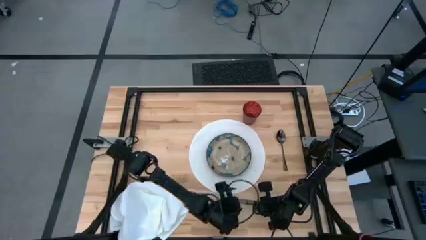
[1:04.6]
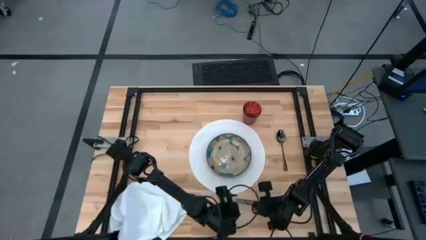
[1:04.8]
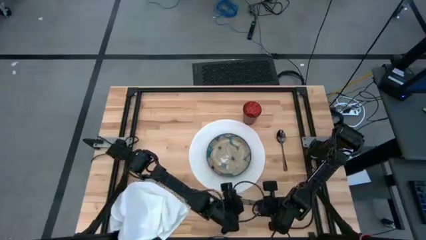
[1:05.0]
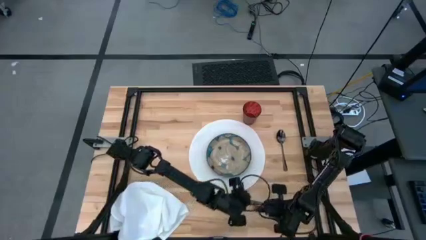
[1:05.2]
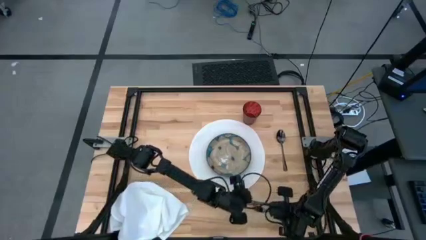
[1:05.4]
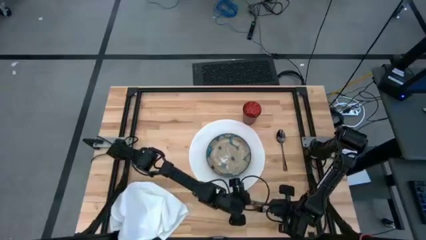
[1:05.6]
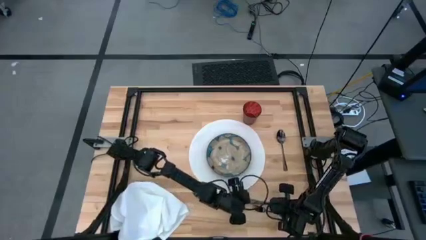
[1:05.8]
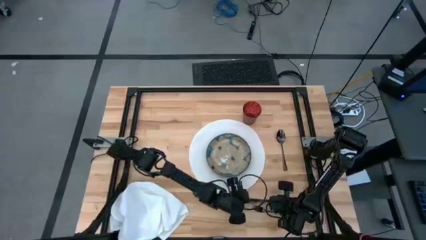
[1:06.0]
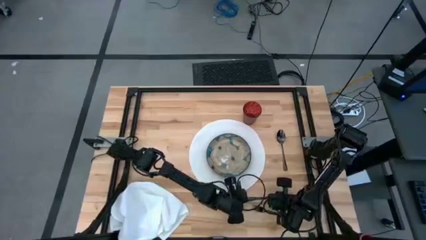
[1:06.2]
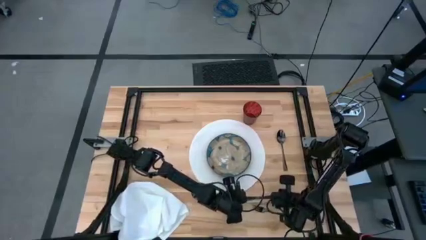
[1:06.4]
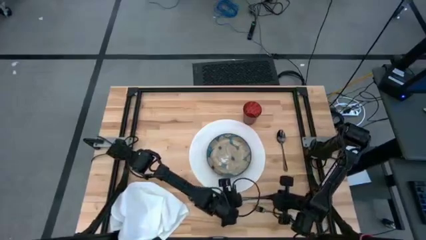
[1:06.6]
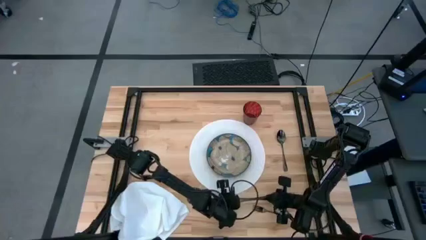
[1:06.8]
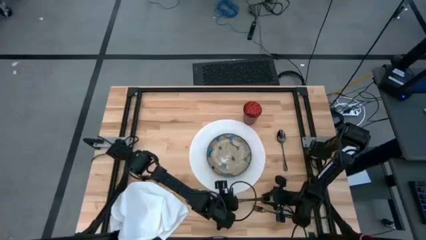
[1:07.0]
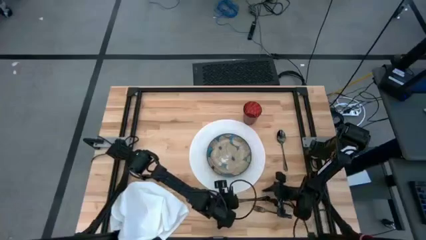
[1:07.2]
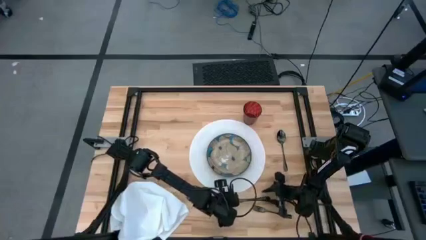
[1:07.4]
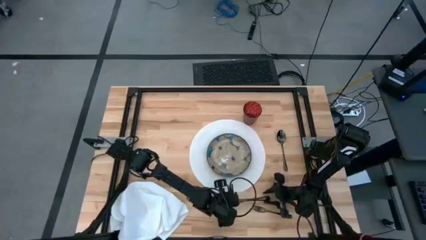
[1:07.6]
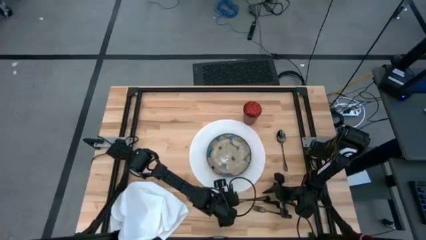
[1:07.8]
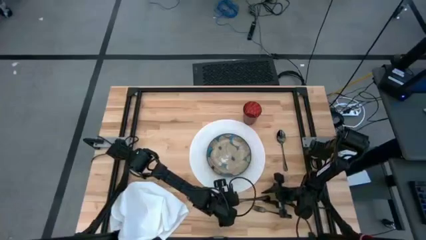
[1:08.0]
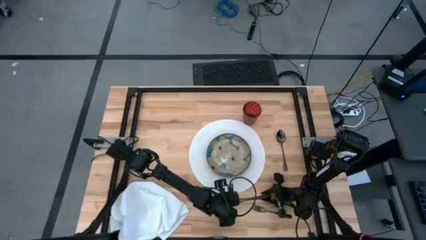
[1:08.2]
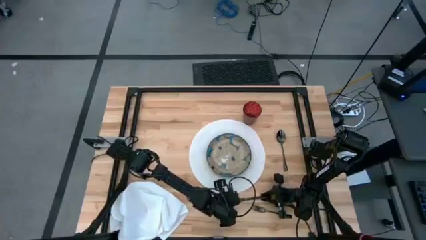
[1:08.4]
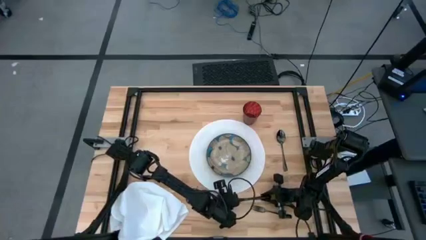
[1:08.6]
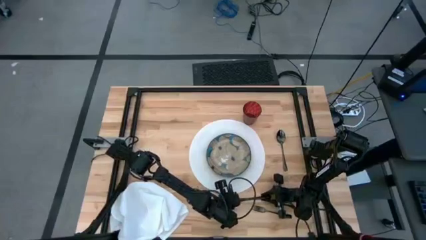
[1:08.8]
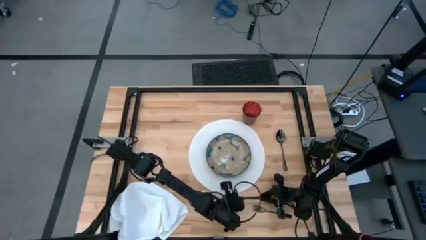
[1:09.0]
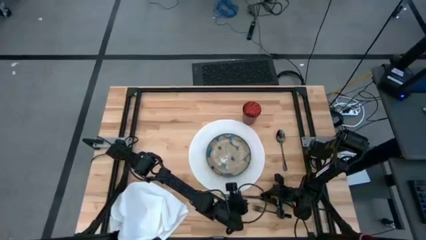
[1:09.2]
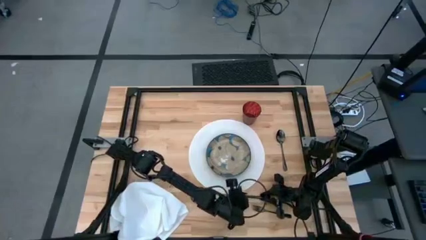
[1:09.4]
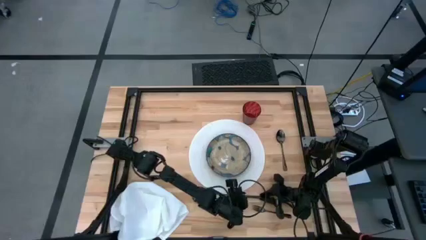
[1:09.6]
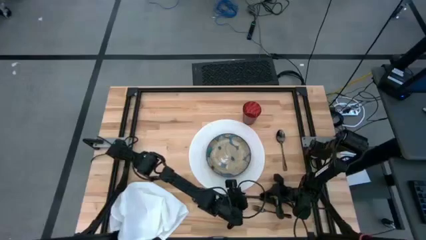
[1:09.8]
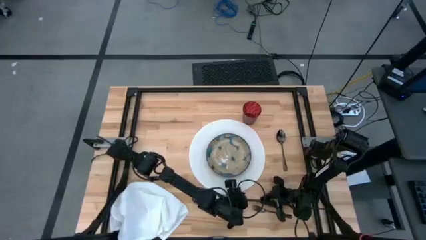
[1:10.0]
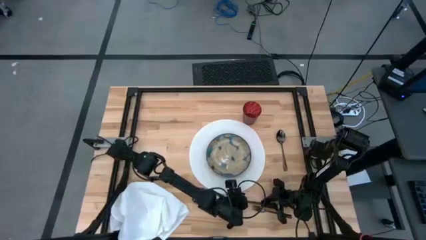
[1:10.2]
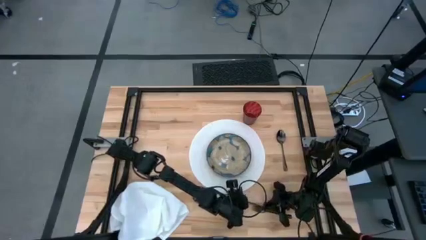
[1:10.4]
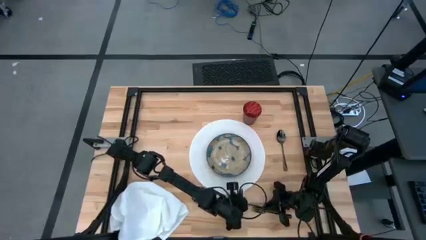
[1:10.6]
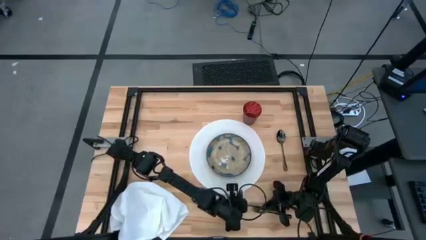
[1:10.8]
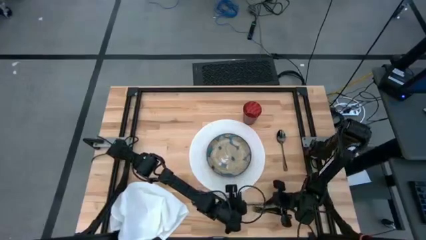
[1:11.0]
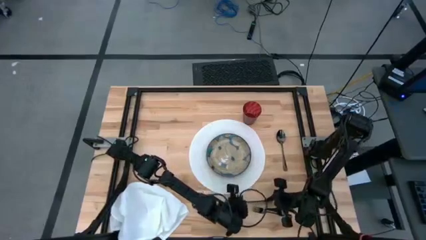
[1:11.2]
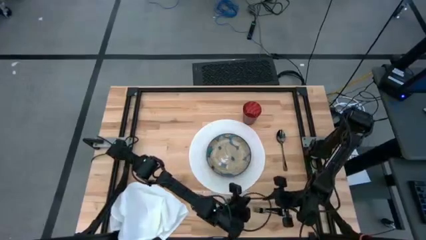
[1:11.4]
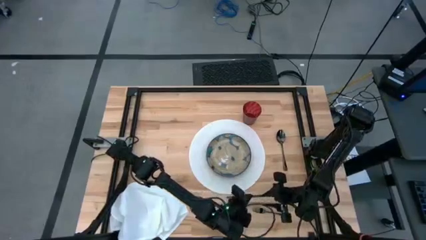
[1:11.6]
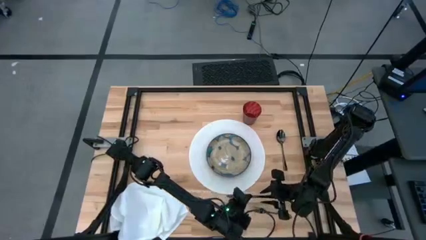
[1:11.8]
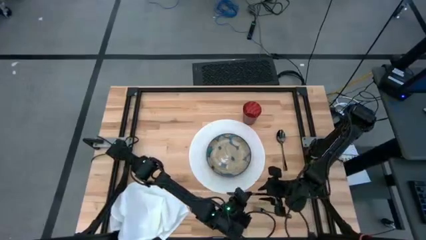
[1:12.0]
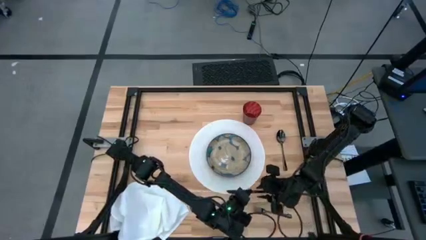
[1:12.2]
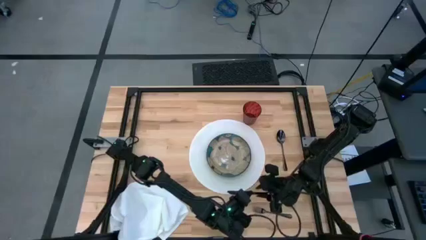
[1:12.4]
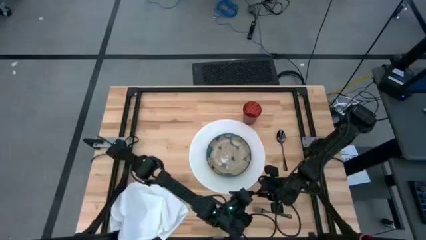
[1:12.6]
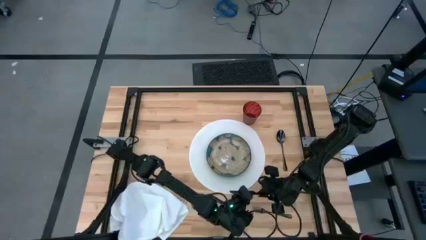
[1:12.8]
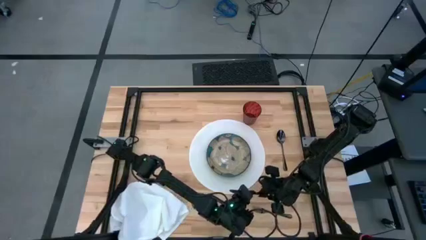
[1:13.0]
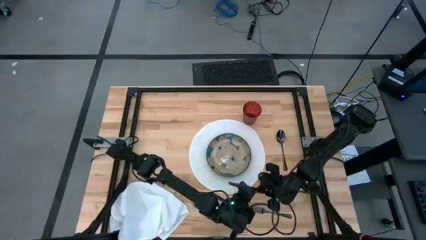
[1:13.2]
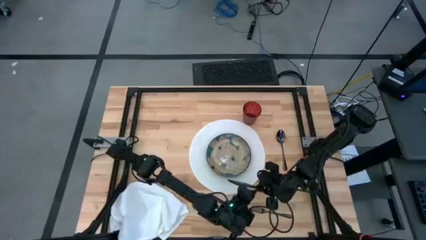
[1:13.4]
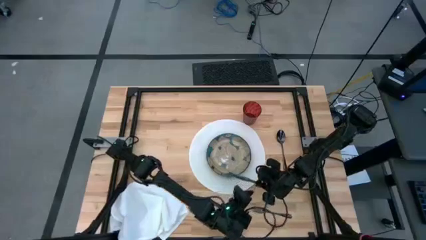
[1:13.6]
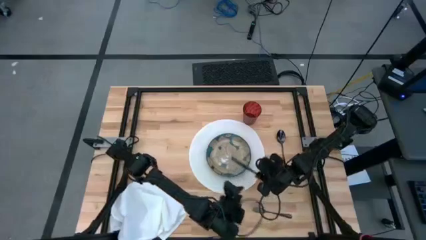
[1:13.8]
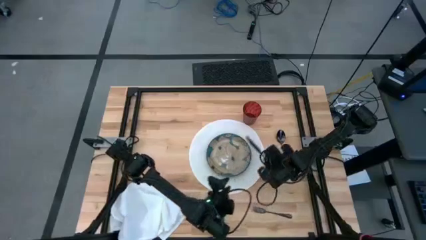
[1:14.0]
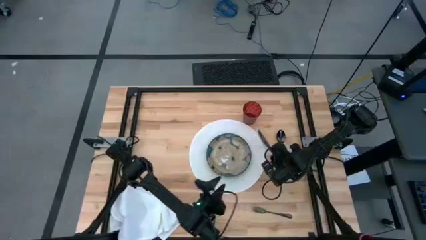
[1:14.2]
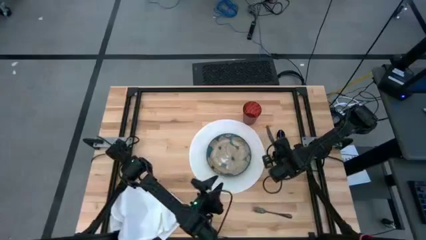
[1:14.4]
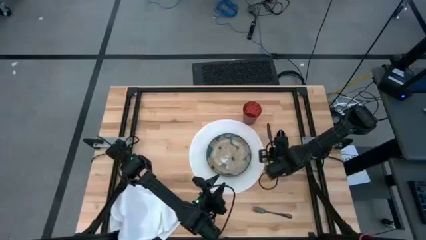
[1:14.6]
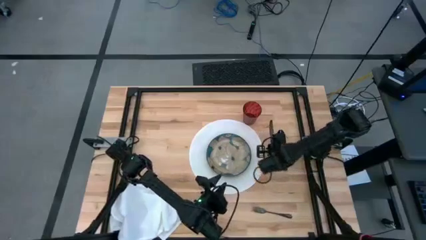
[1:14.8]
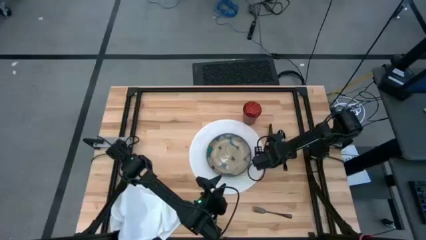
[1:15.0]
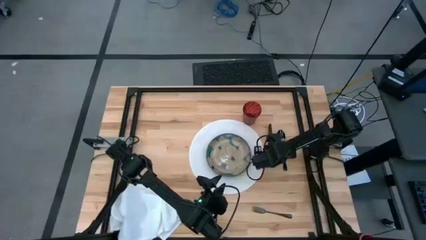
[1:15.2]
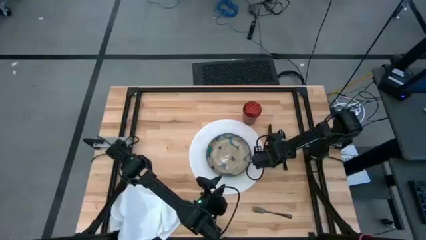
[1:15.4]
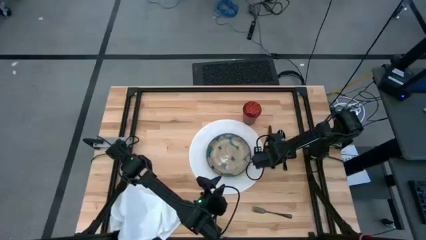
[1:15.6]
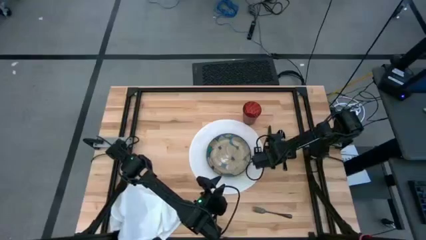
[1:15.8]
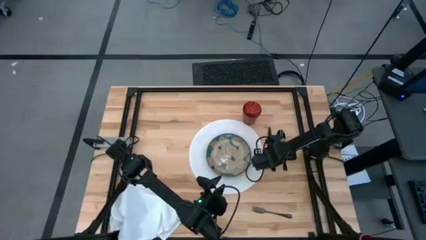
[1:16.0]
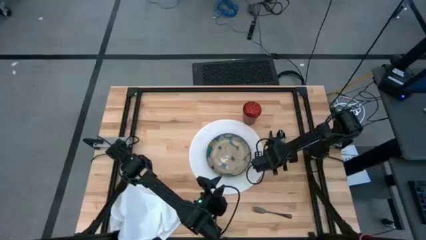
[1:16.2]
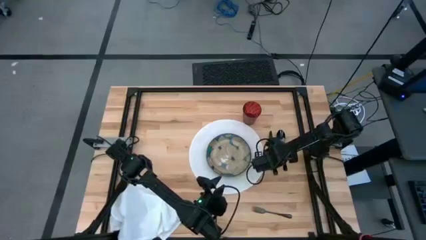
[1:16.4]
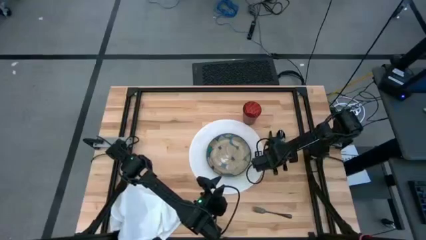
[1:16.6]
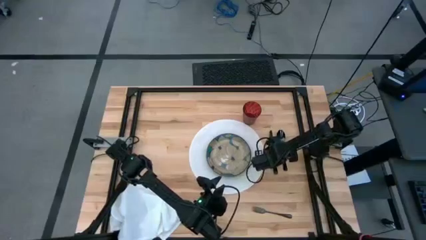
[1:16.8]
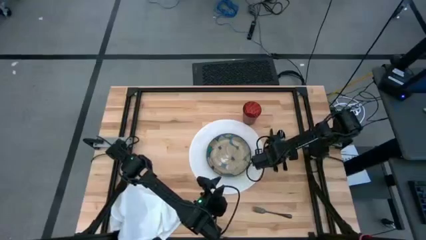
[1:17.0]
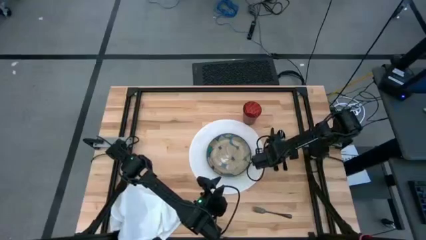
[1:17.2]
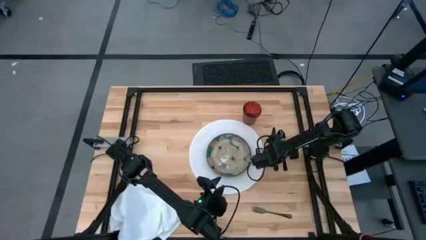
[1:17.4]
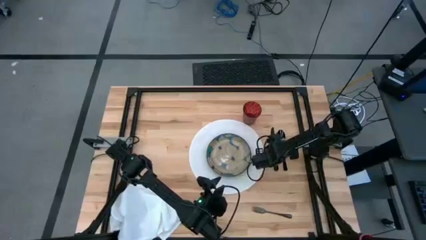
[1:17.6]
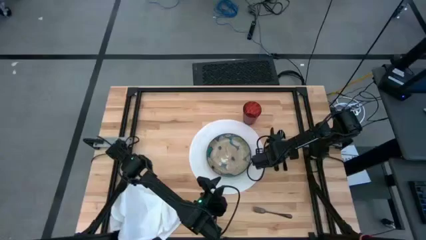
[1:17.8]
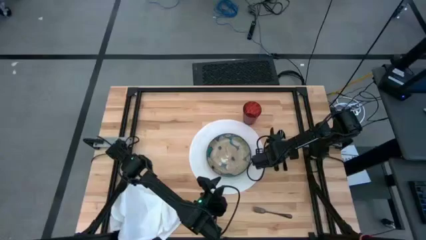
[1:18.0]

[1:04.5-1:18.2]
Task: Set table place
Move the knife to the middle right of the table

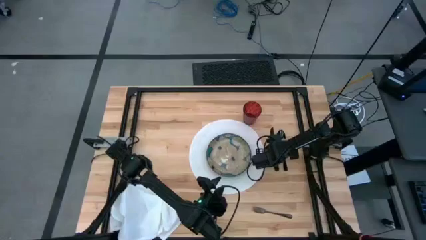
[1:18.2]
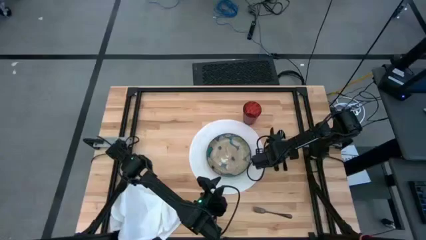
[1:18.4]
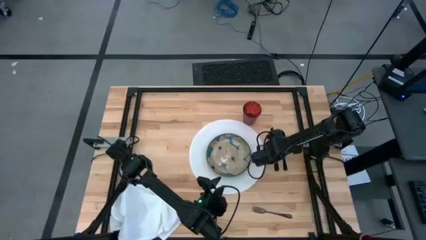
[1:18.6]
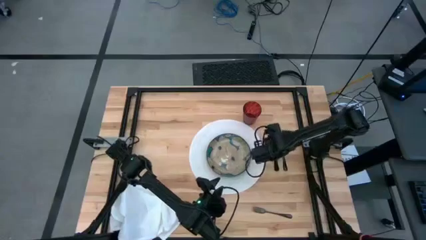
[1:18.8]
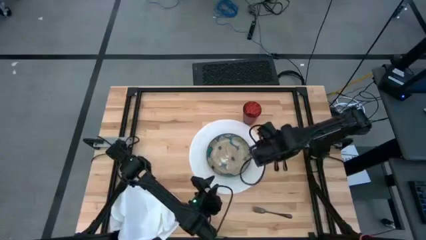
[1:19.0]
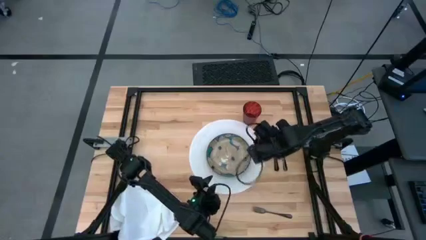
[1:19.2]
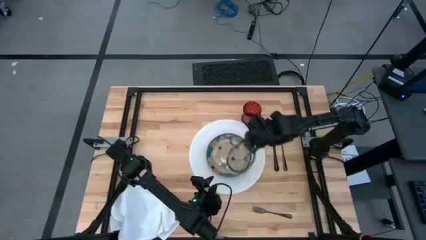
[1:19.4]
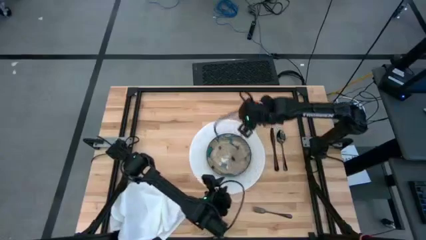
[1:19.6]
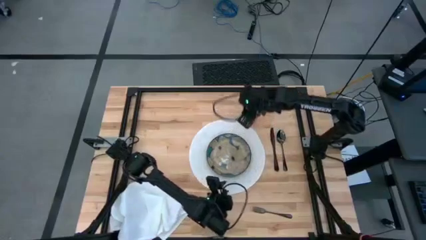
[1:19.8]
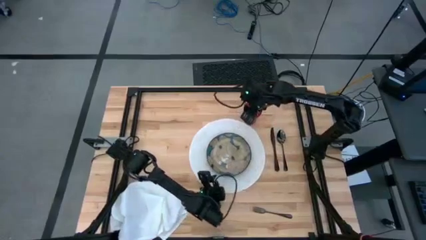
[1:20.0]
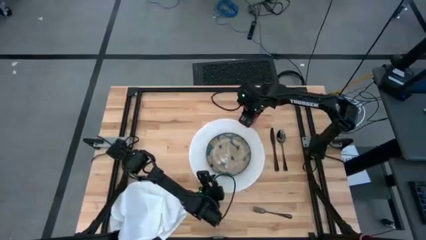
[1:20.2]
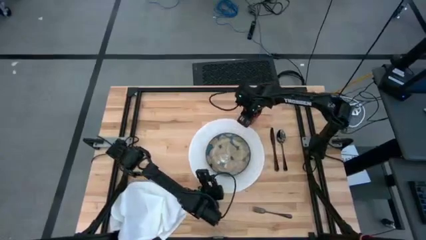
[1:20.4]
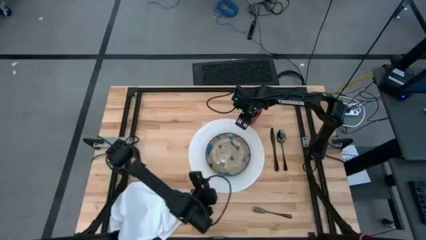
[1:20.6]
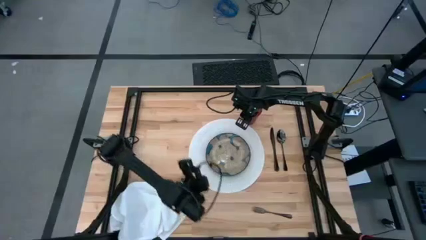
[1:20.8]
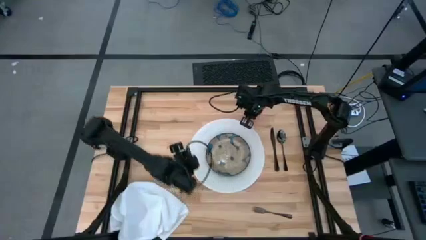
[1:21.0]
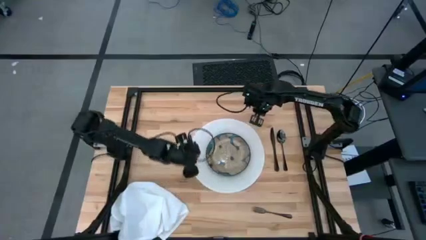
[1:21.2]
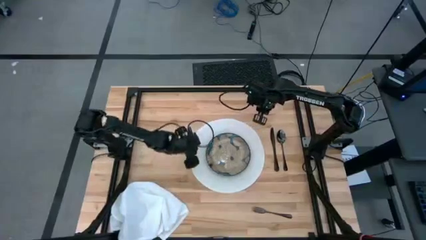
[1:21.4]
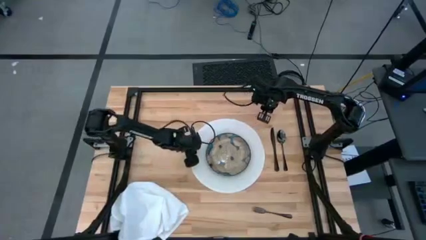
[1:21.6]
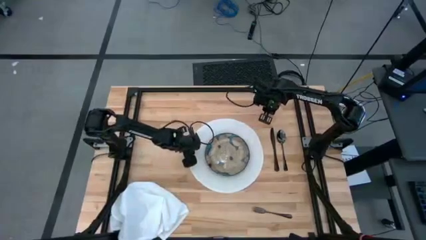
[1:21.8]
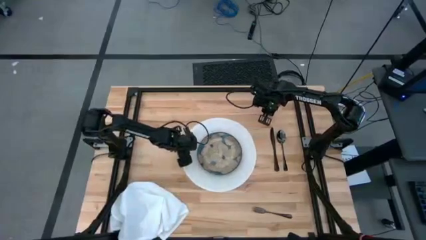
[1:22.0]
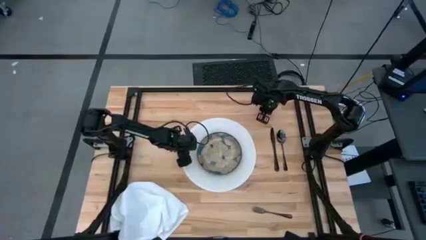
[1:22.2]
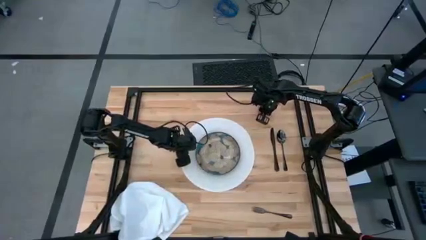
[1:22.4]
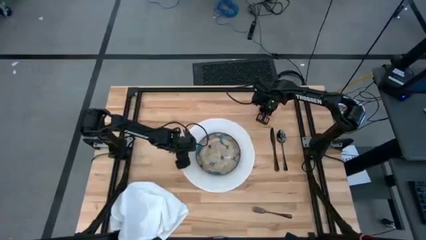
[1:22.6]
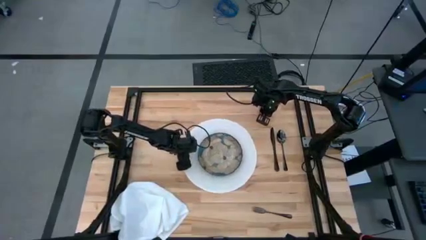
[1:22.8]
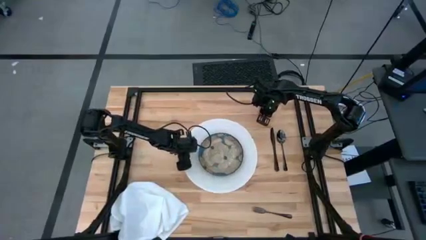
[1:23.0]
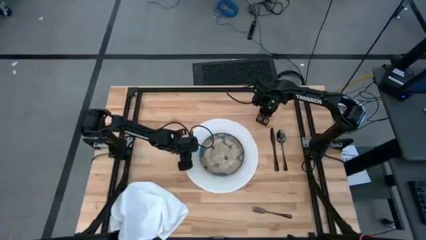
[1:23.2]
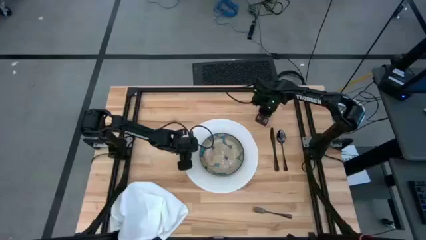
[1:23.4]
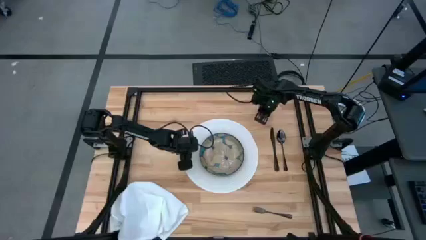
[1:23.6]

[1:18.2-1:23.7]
Move the red glass to to the top right of the table
